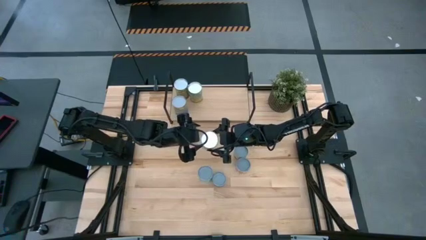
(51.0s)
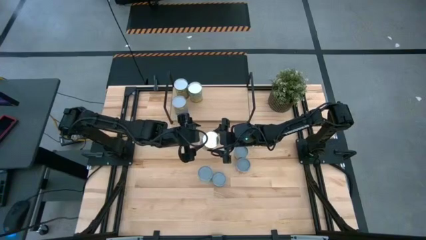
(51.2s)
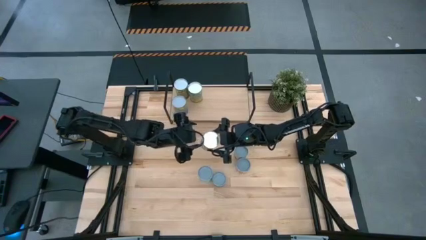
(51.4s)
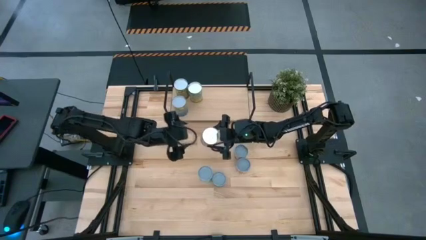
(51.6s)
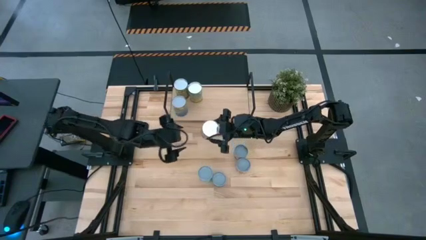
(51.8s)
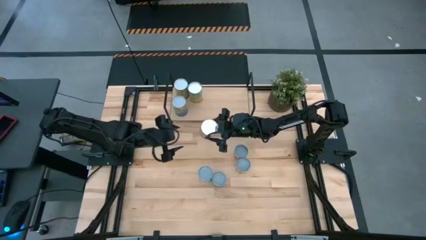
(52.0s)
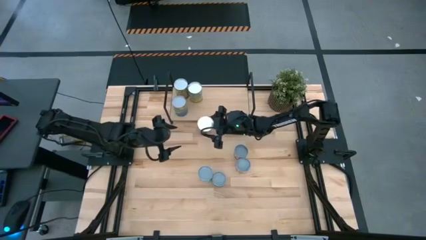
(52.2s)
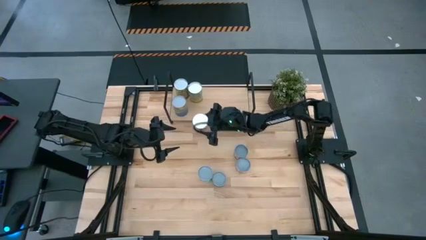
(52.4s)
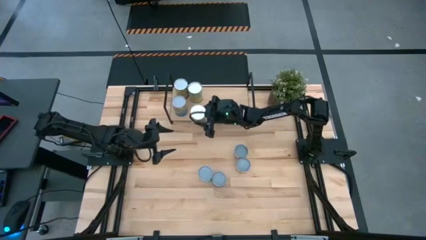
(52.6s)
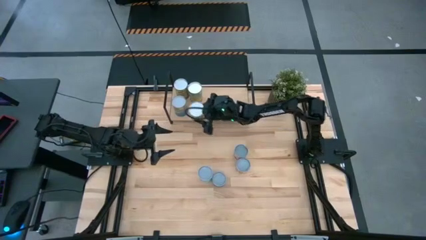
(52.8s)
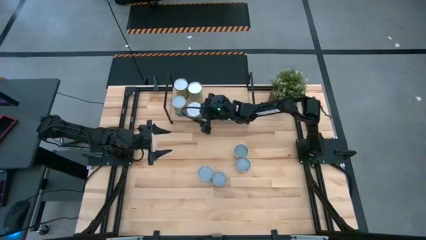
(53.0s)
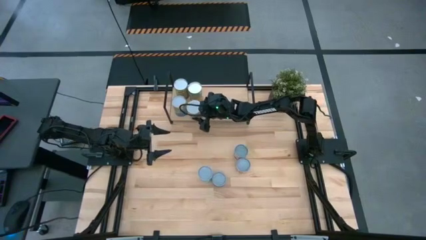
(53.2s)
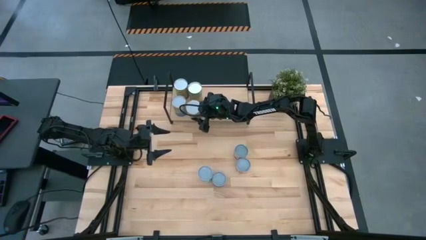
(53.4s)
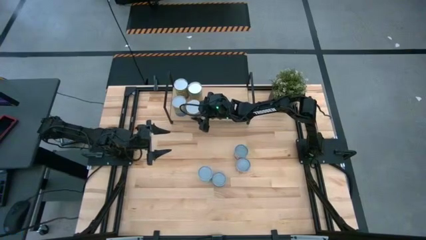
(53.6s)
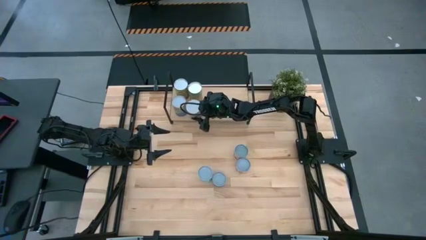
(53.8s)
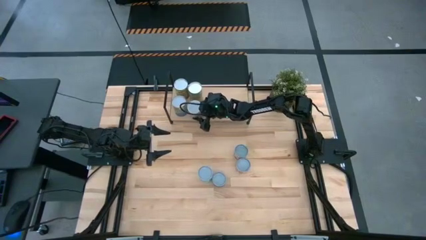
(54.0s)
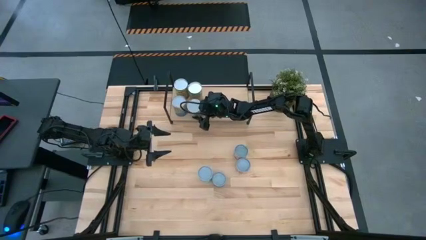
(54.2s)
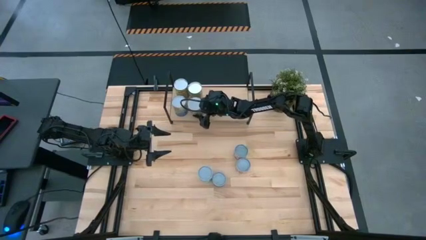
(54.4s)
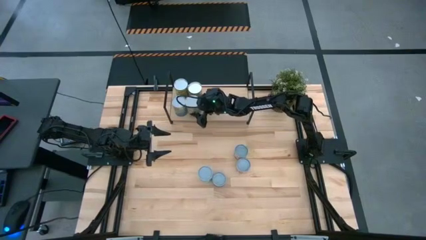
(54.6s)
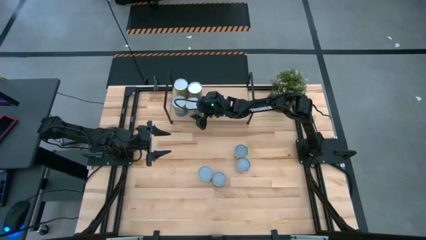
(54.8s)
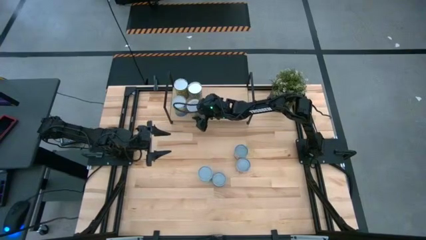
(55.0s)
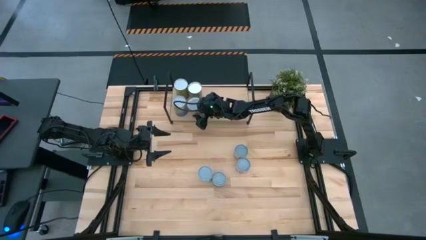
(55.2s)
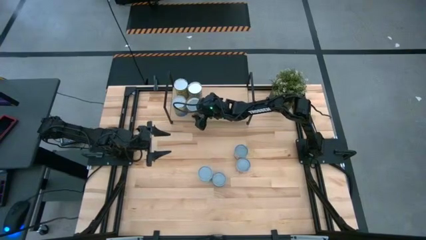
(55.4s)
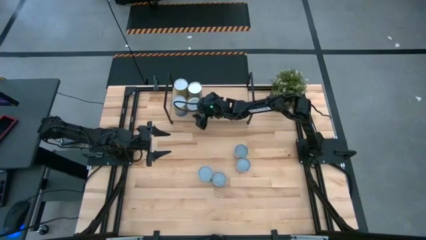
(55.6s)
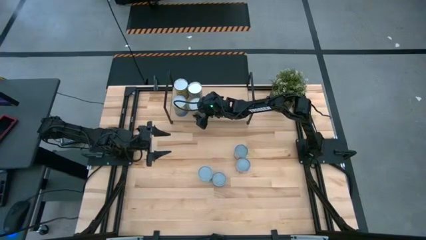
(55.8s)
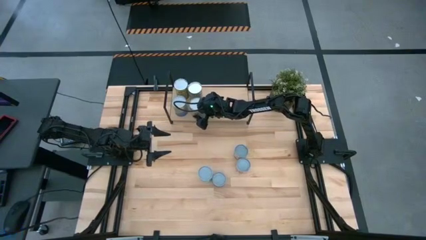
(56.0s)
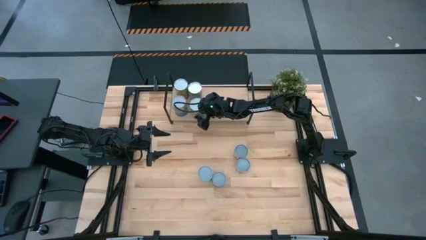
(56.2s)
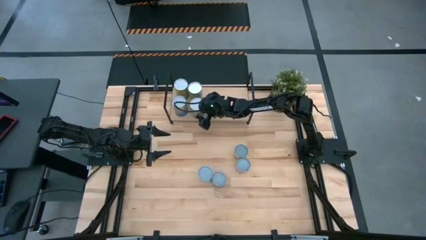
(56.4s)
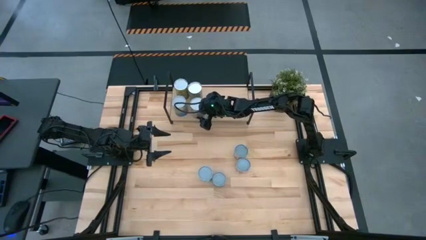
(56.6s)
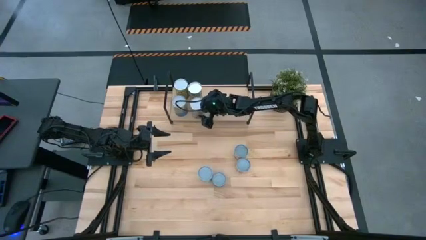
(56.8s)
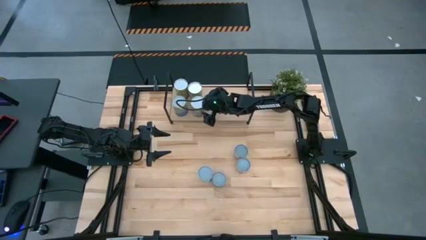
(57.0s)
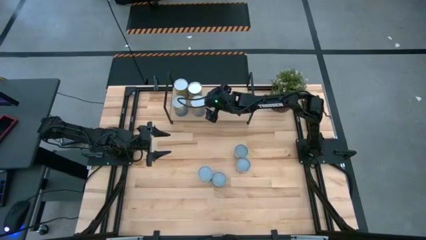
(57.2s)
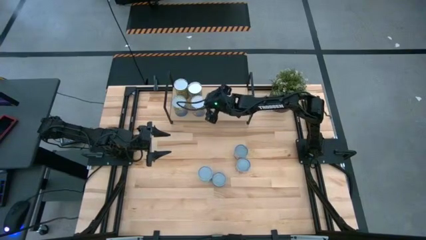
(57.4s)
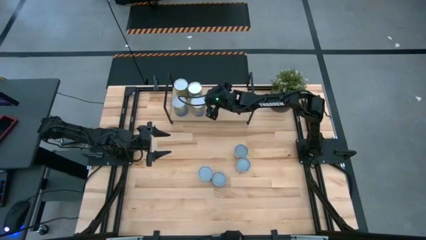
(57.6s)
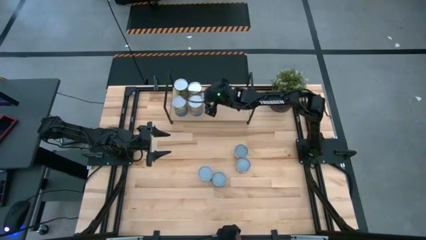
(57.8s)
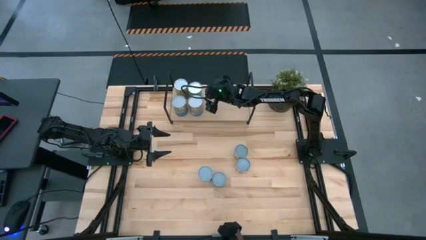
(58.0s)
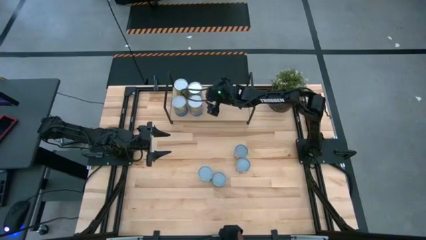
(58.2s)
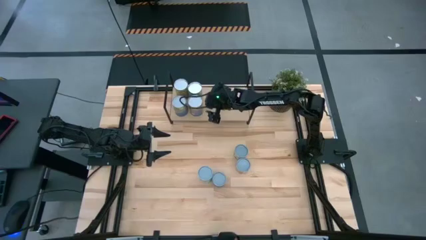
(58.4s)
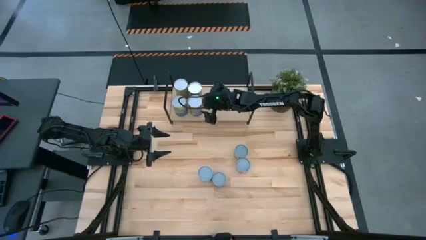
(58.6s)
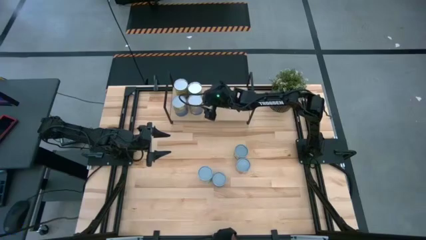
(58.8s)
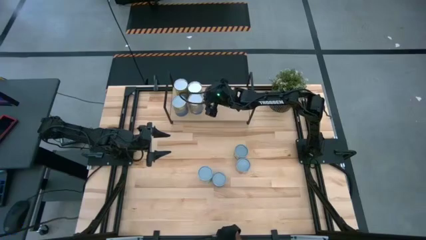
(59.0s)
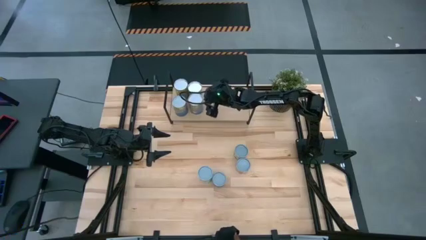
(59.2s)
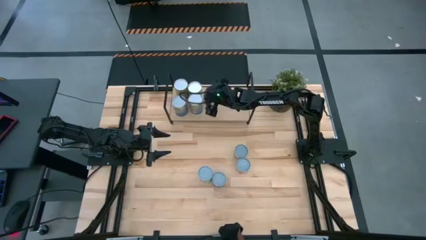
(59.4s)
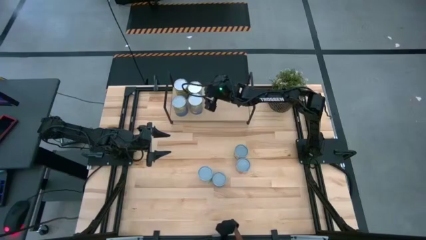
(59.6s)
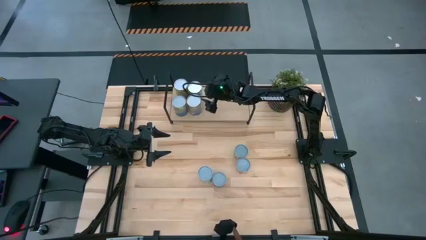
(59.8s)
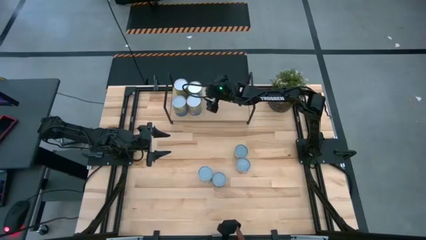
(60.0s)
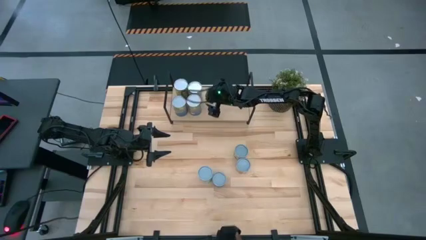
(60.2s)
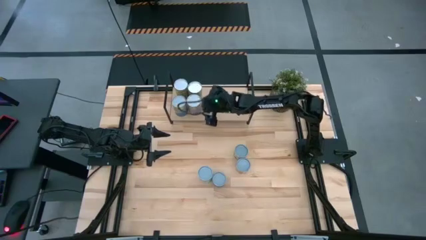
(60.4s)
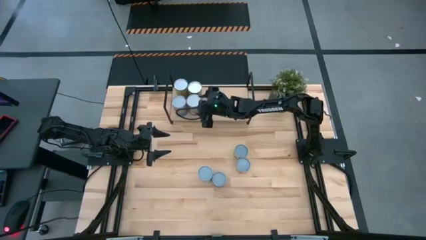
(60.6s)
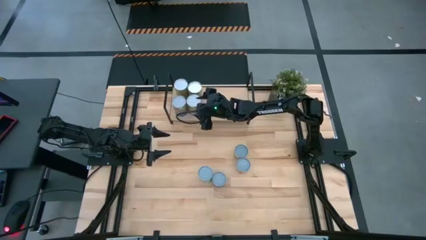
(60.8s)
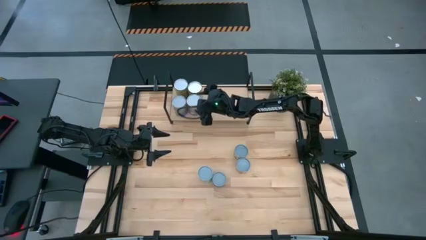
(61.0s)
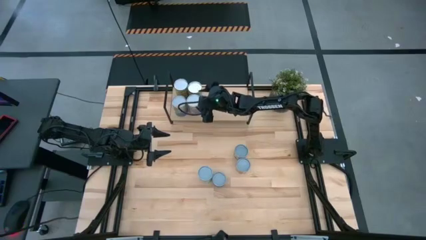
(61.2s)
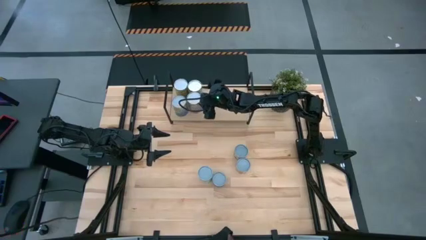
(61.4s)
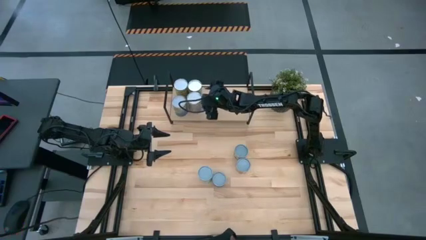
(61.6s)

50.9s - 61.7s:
Task: Pick and place cans onto a shelf
Put the canned peaches on the shelf

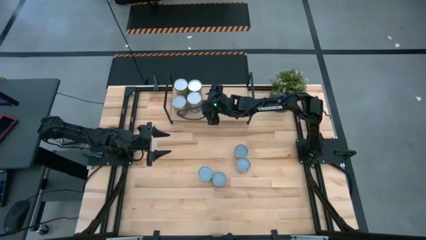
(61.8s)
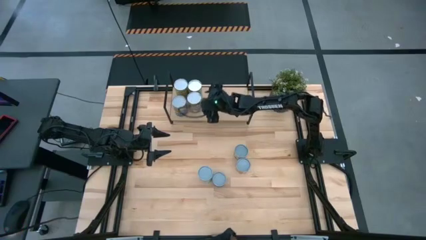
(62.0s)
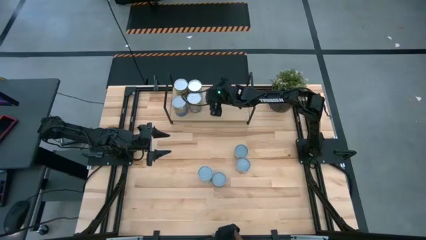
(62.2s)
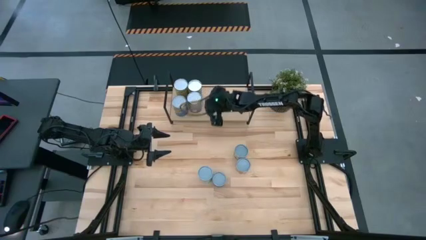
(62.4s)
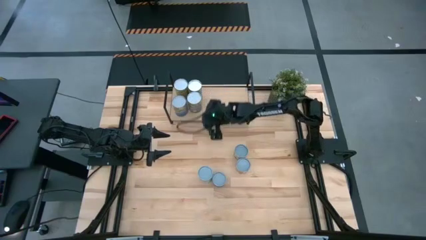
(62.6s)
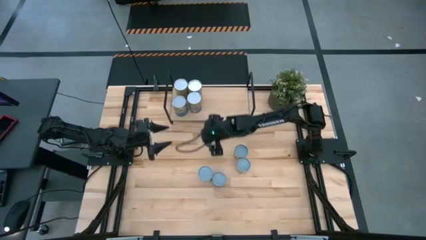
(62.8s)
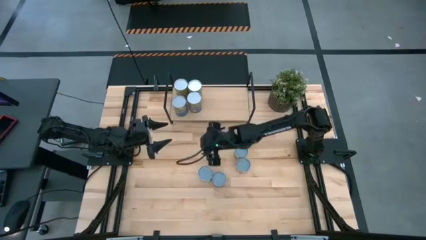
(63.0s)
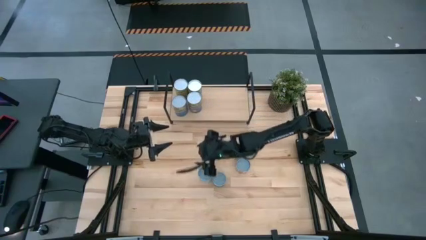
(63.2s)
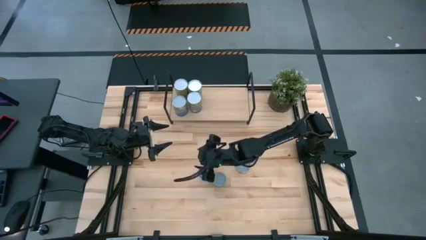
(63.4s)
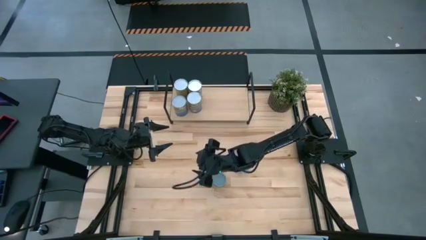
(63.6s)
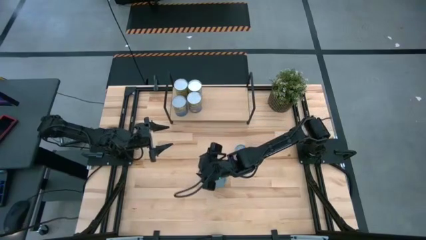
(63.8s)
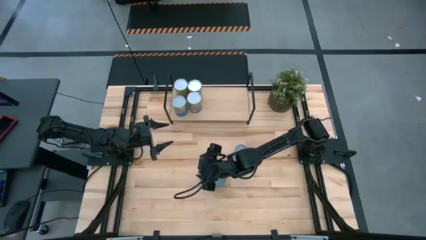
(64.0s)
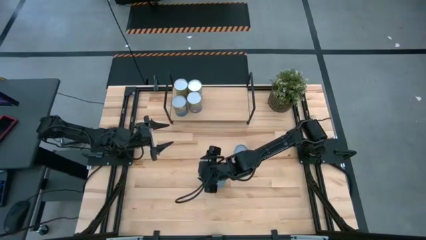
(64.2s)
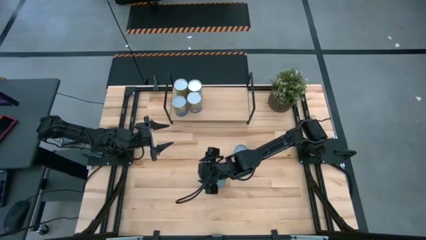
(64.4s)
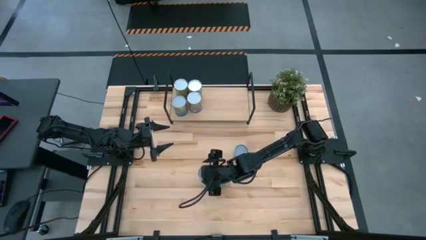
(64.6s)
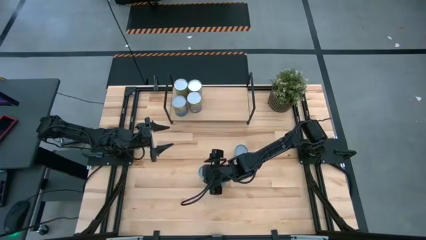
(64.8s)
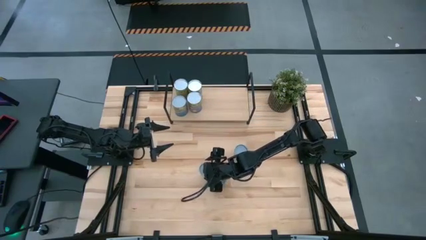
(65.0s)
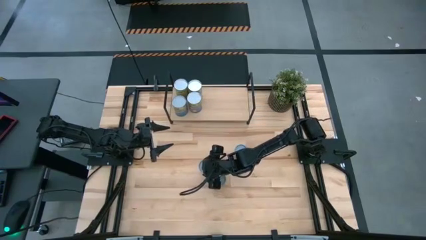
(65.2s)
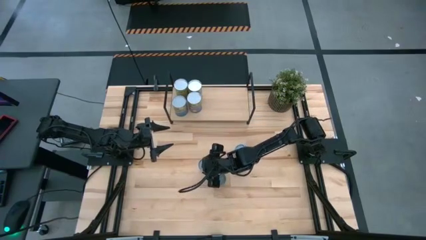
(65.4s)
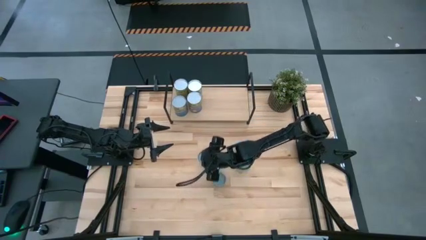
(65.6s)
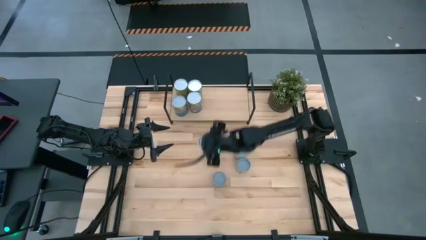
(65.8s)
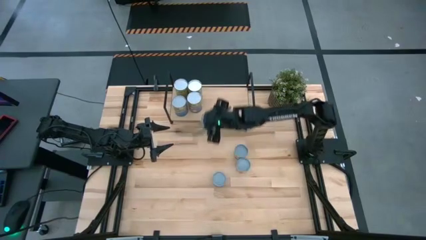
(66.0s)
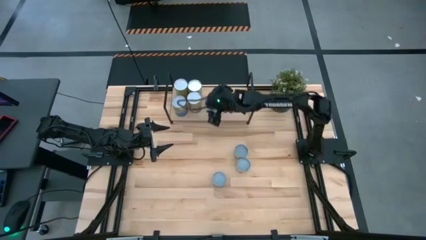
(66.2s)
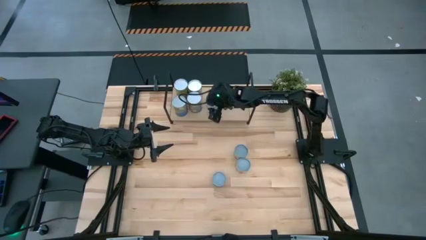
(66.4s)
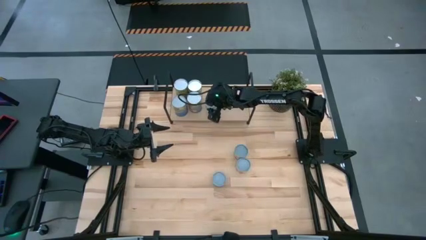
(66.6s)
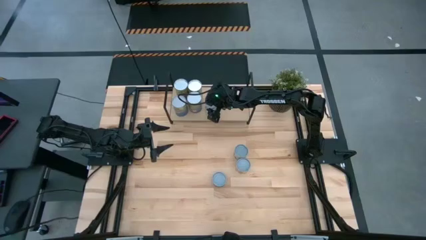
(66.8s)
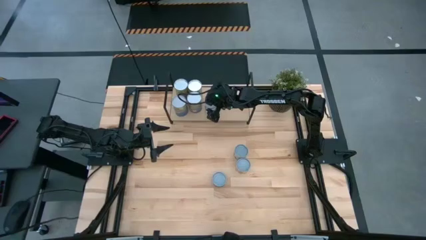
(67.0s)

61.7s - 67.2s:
Put the canned mixed vegetables on the shelf
